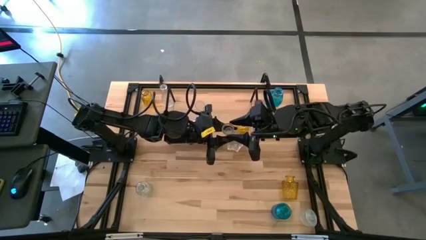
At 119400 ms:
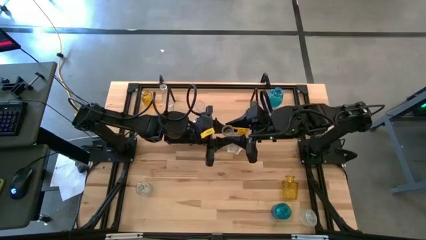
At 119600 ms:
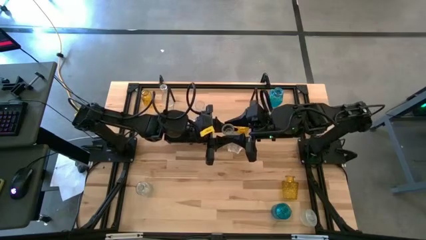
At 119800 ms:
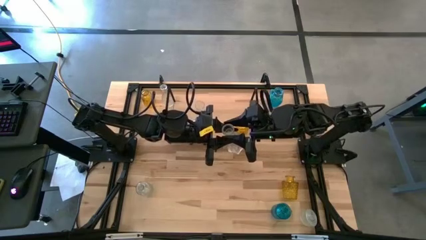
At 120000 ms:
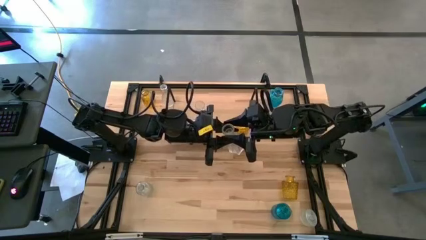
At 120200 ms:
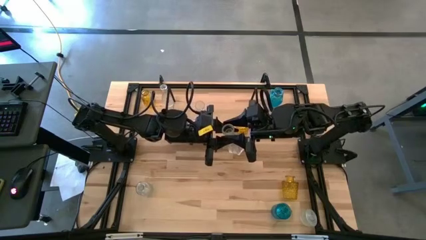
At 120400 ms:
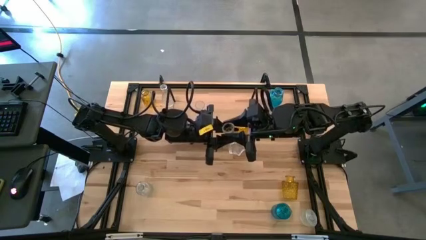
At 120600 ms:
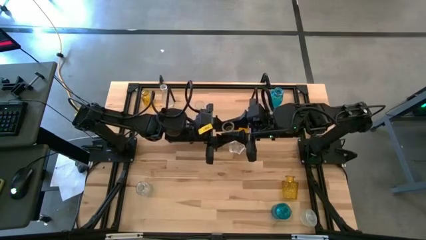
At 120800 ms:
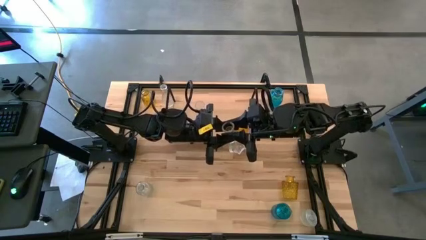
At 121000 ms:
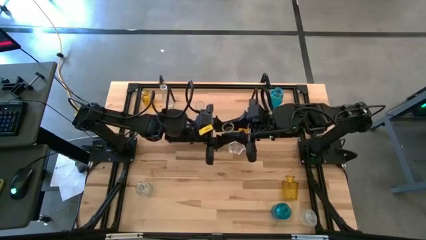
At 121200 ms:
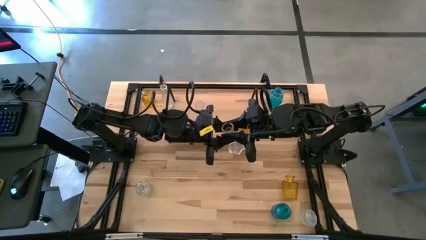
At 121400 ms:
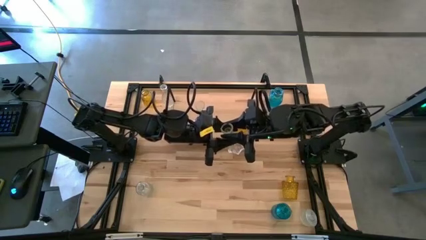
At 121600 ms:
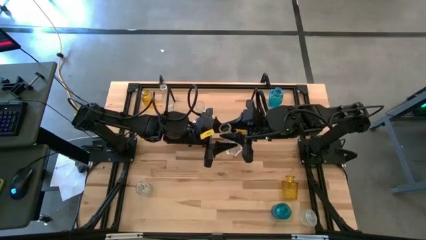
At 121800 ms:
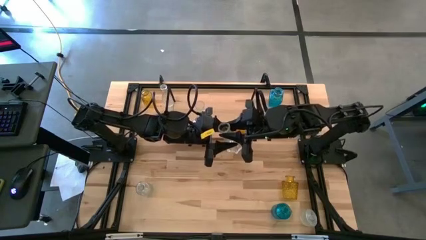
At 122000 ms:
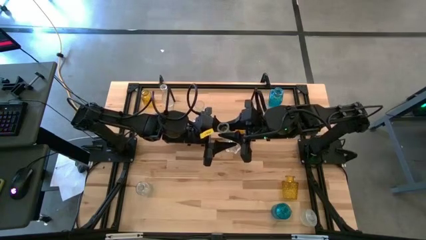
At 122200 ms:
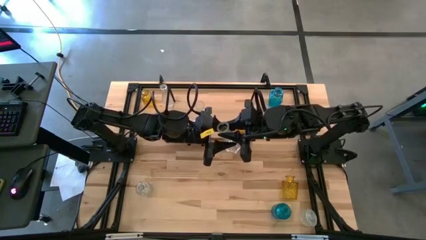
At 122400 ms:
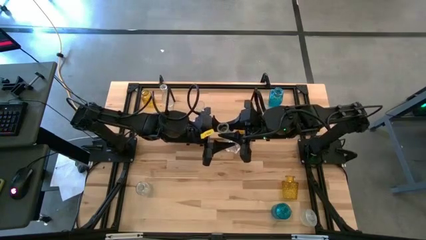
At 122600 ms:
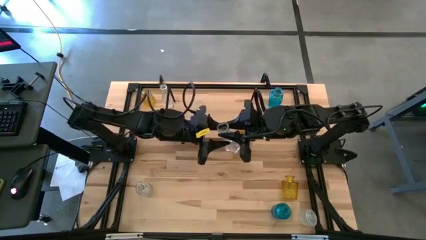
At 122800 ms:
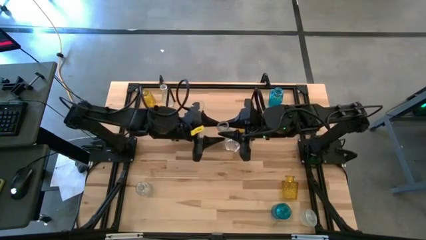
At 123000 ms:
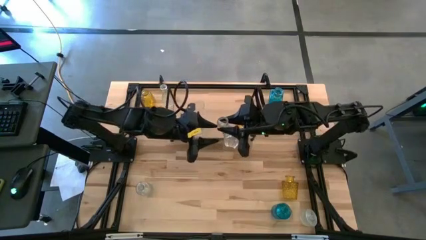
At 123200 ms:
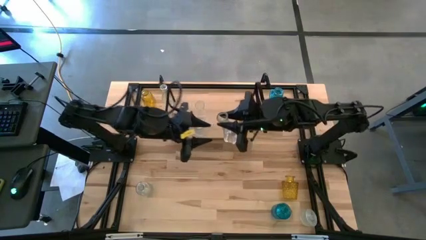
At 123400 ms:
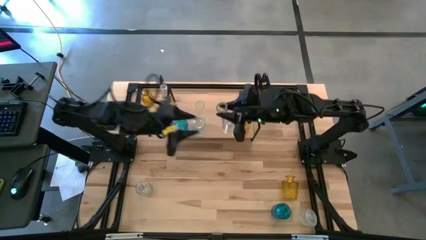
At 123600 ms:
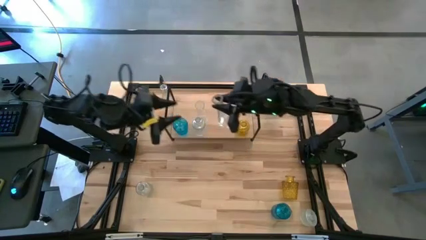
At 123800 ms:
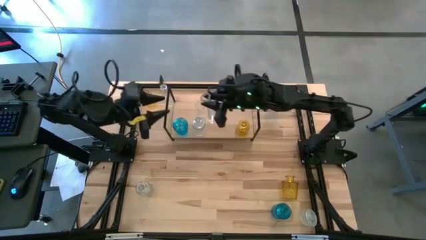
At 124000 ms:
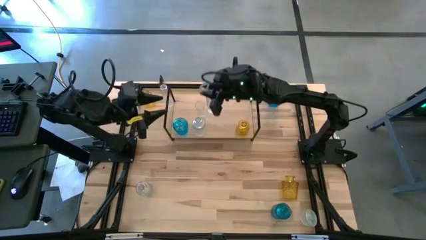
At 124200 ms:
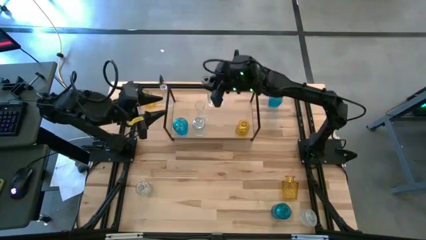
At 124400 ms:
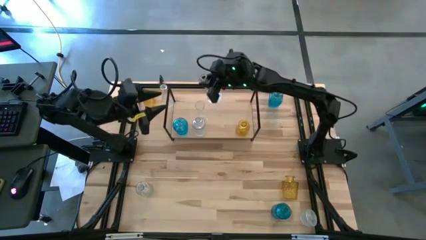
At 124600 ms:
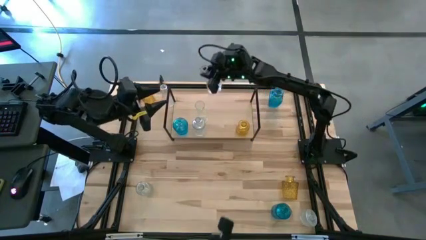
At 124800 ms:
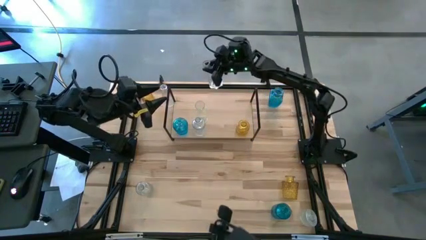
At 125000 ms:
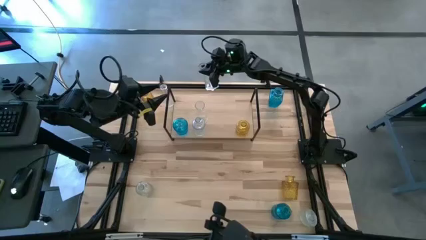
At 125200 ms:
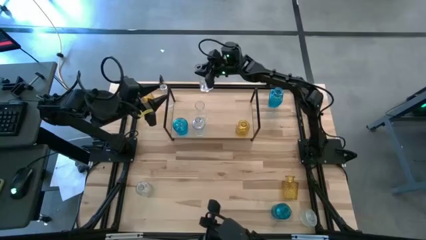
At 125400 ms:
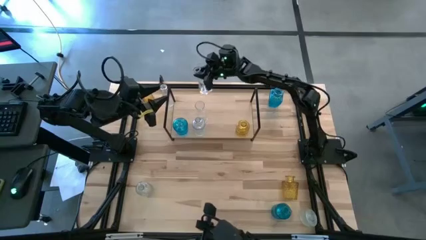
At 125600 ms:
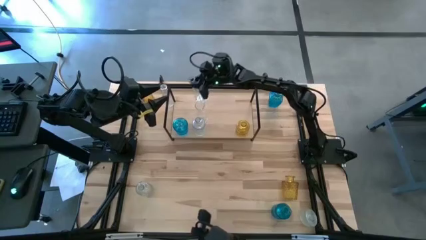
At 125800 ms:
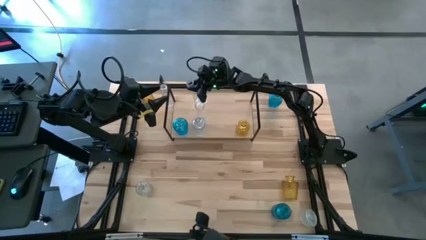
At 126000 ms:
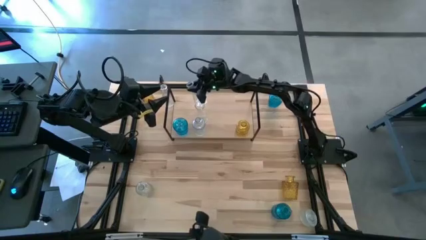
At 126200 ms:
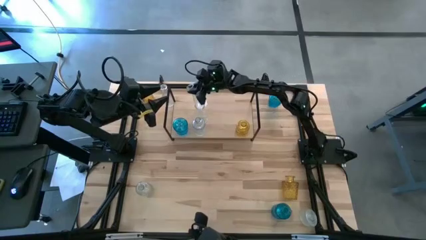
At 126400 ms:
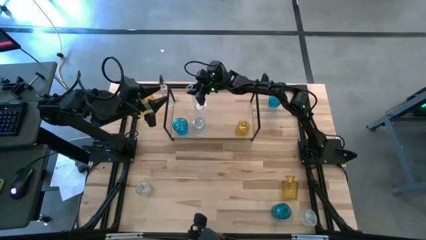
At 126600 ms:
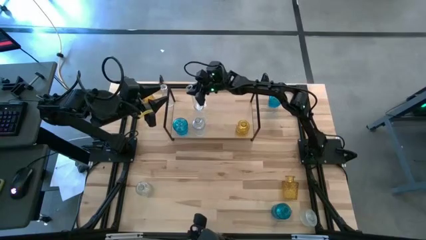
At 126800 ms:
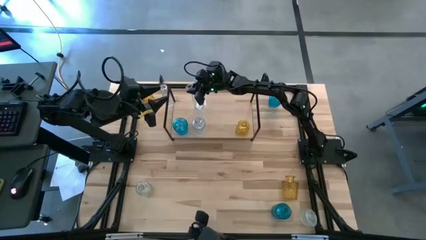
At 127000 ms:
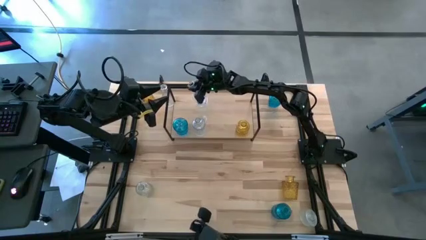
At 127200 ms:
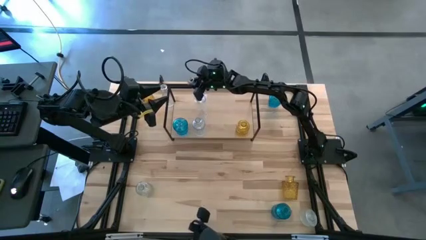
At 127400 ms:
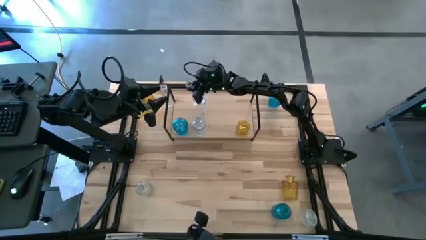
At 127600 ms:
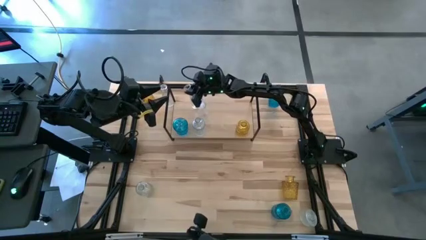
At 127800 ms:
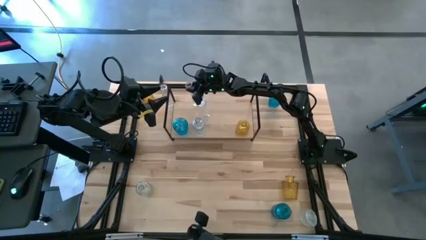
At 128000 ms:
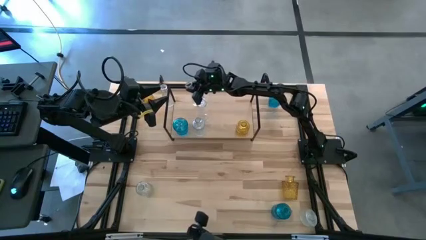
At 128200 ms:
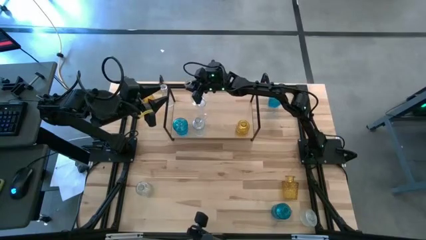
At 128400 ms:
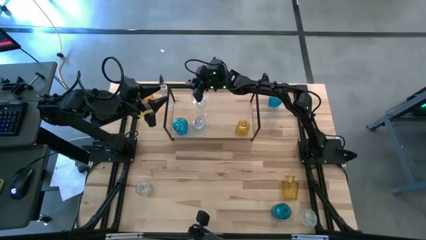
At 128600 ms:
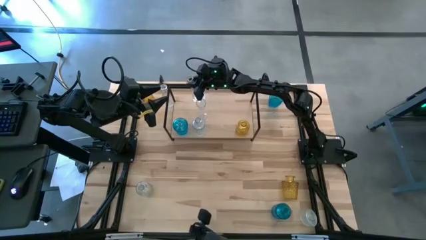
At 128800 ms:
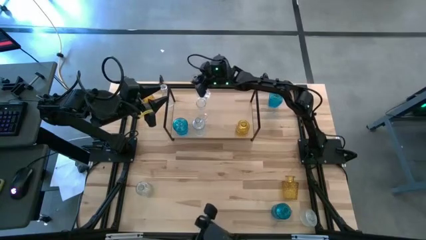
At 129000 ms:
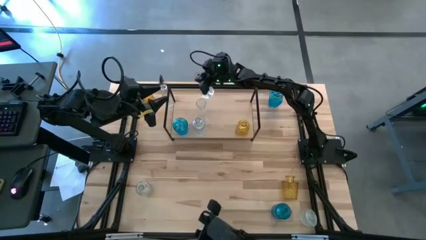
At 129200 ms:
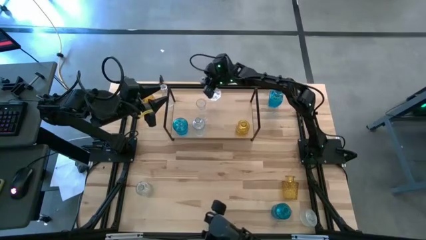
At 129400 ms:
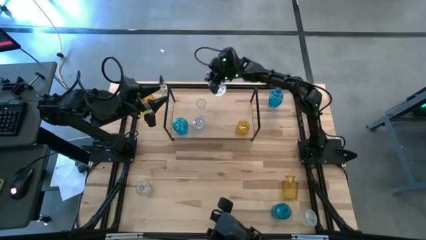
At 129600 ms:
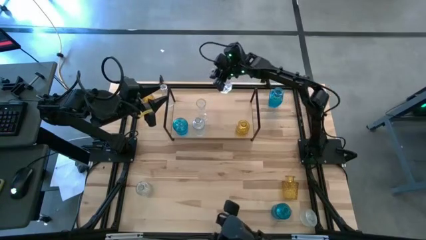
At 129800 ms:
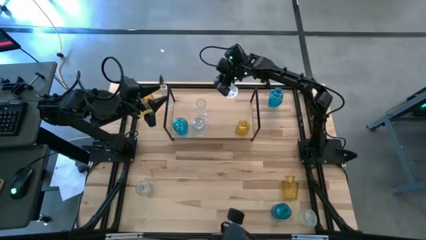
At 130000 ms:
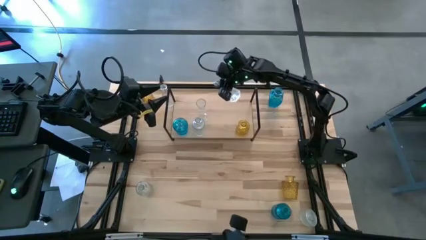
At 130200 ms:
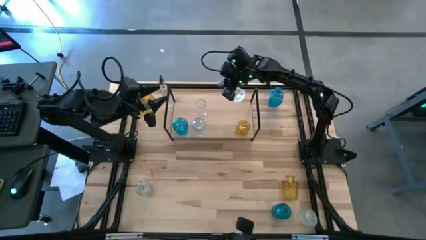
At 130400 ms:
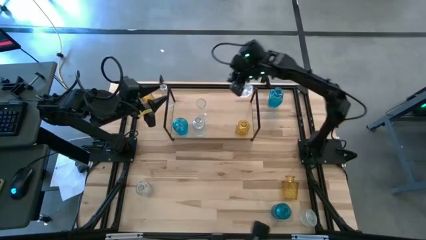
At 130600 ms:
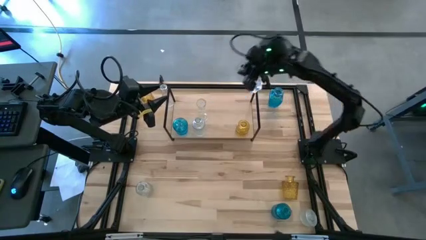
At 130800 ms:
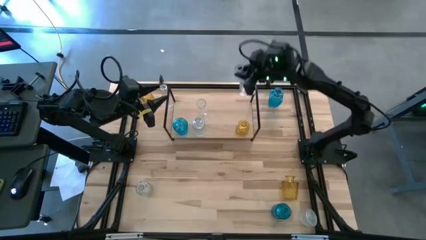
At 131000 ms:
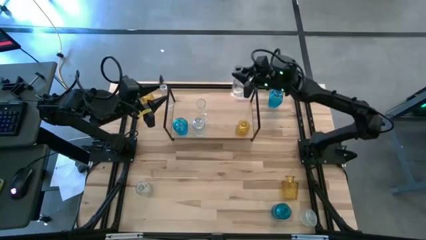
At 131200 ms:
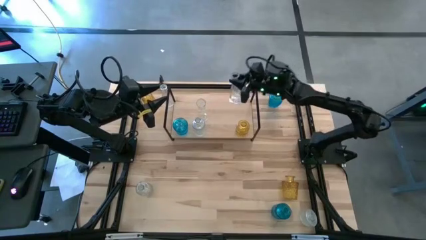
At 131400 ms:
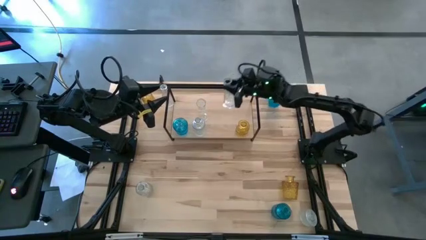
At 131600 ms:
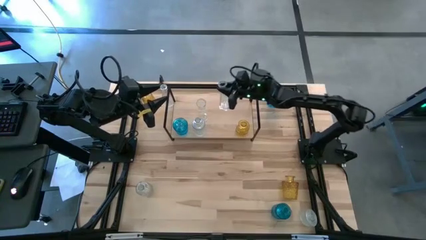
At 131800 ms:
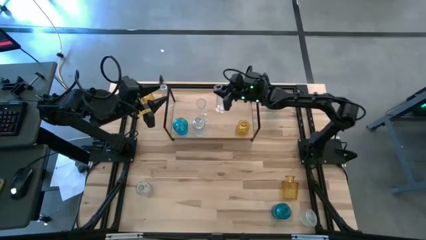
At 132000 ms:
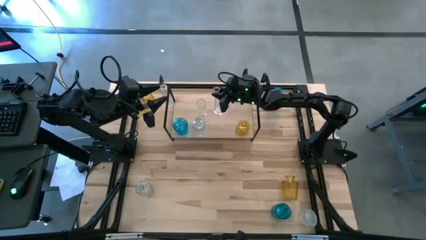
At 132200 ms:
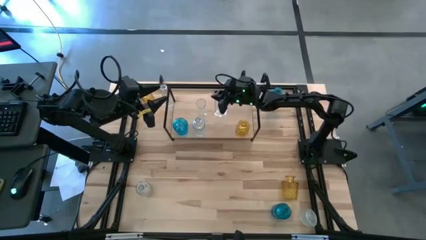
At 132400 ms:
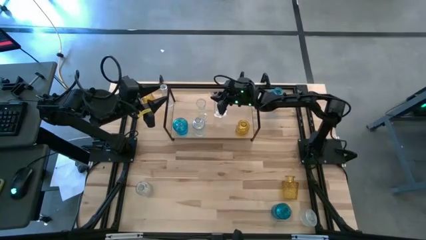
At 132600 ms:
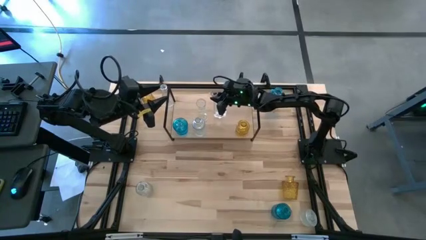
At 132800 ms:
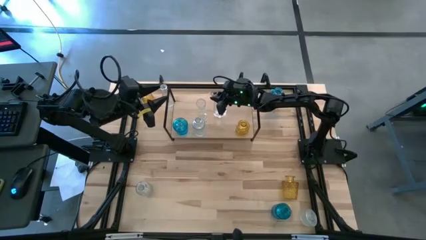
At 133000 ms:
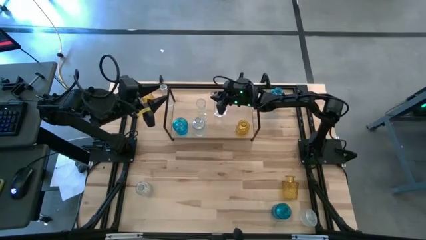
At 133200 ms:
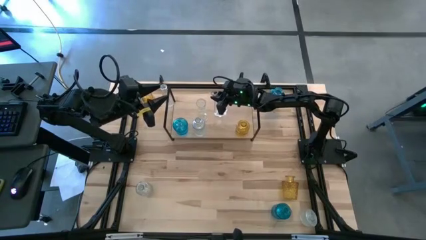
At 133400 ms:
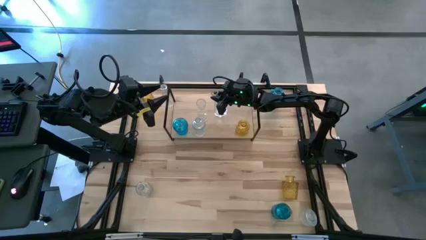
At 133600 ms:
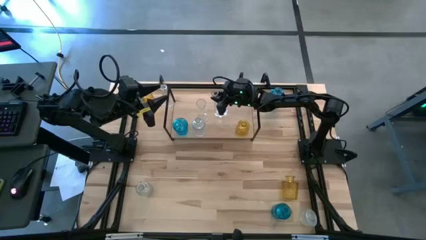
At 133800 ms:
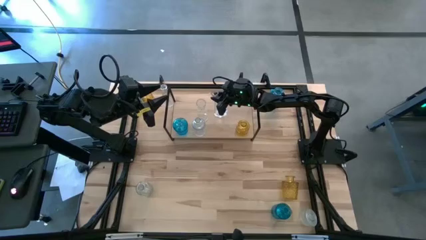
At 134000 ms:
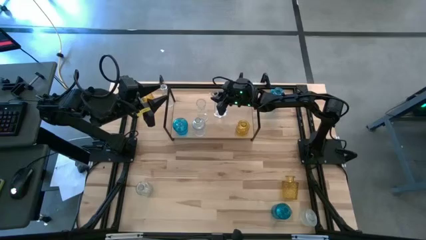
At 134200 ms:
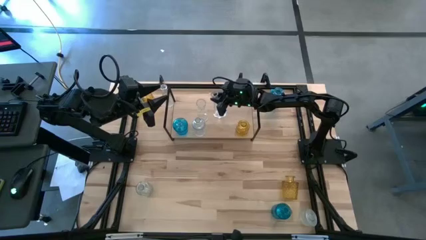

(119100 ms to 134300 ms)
Task: sort vases onto shelf
Put the transparent vase on the shelf aligned with the other transparent vases
